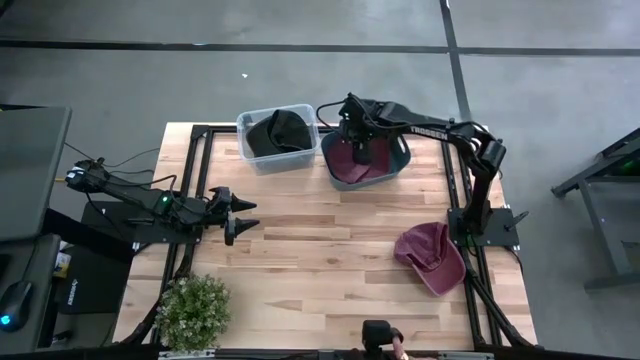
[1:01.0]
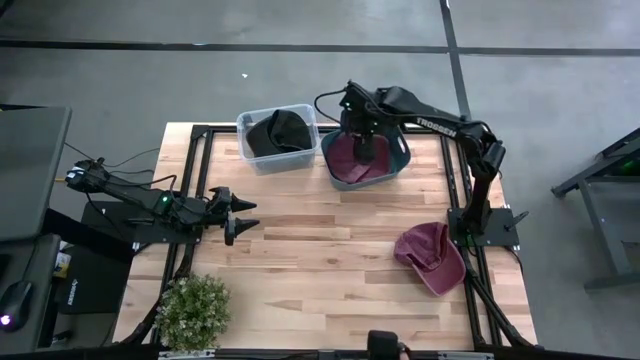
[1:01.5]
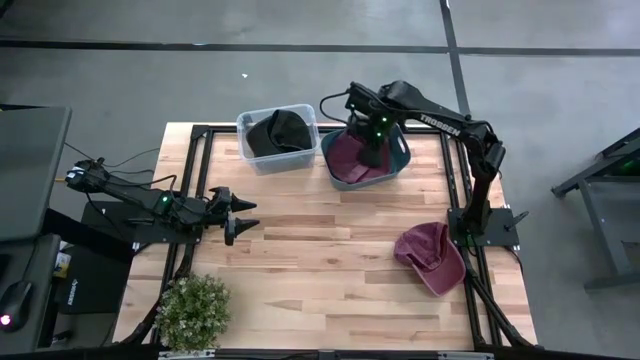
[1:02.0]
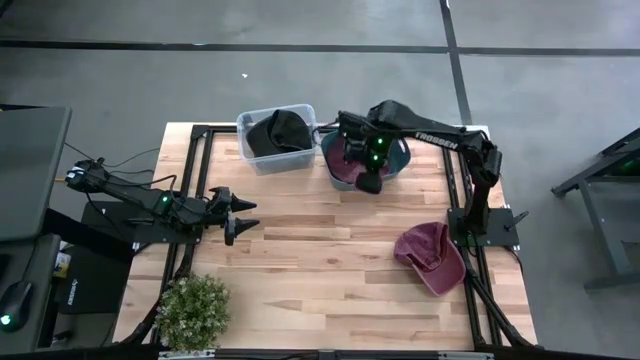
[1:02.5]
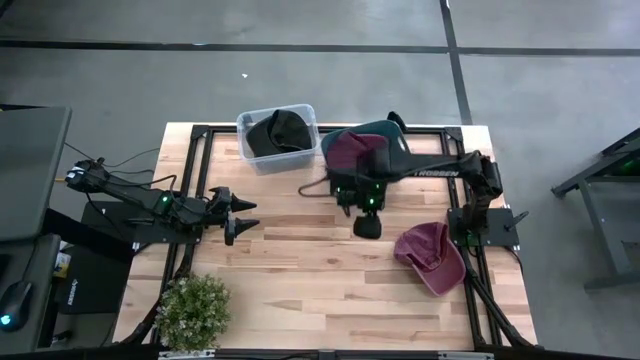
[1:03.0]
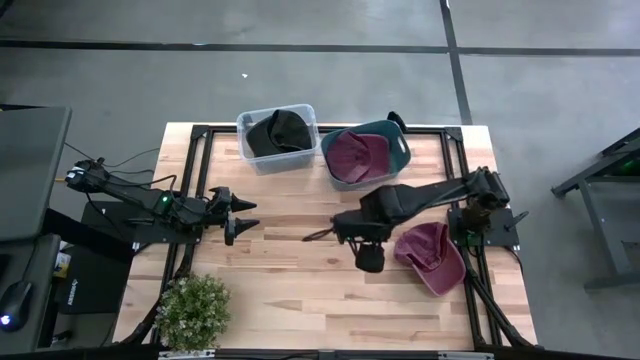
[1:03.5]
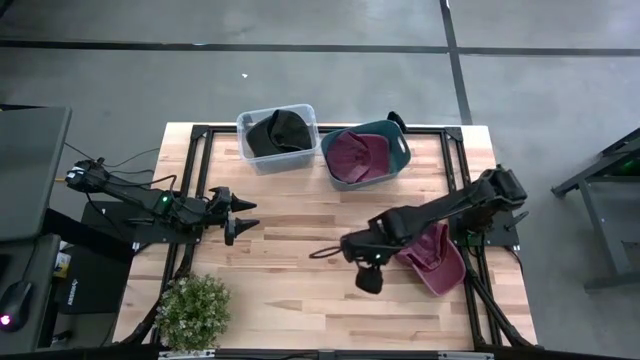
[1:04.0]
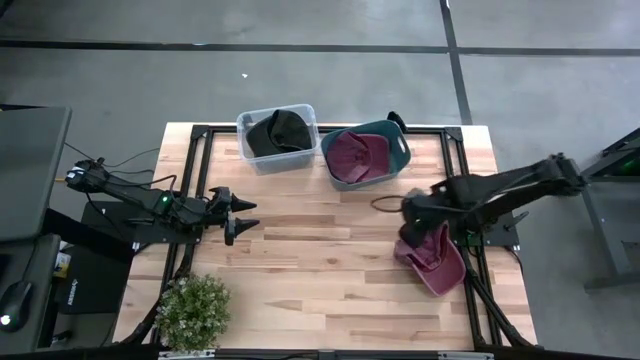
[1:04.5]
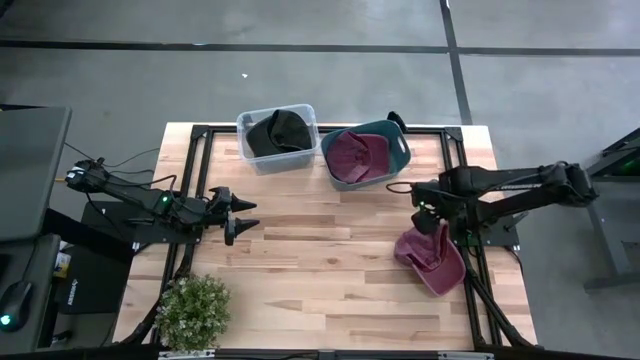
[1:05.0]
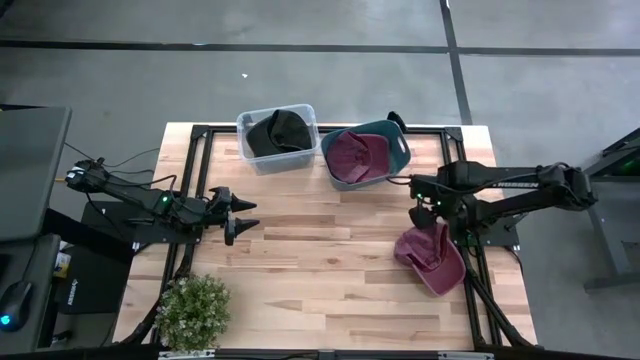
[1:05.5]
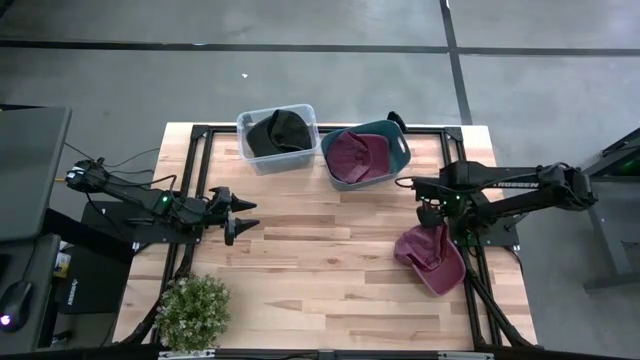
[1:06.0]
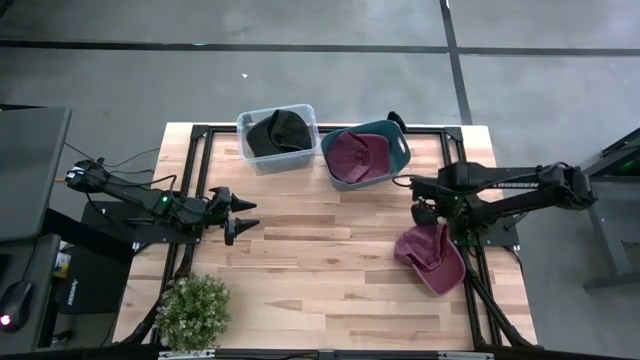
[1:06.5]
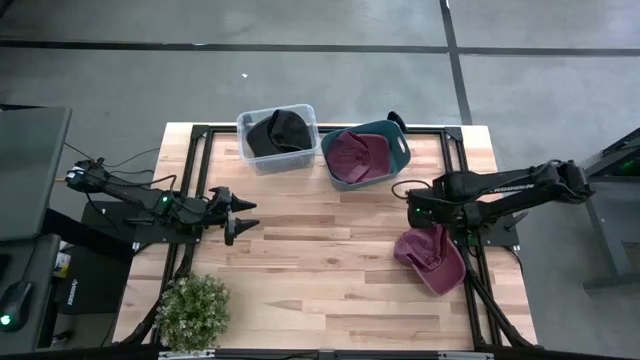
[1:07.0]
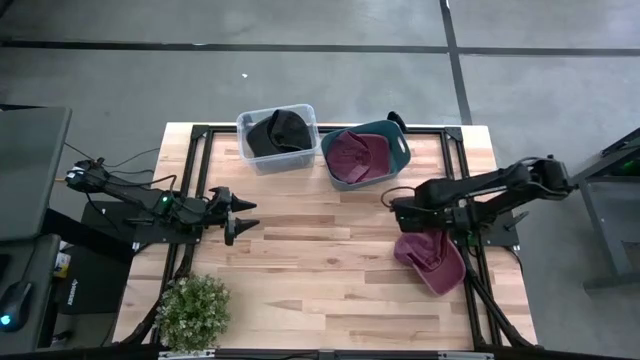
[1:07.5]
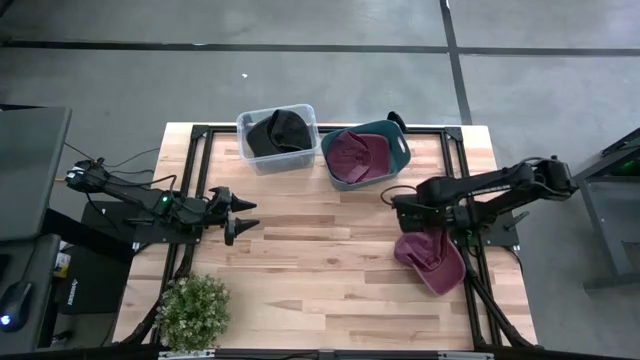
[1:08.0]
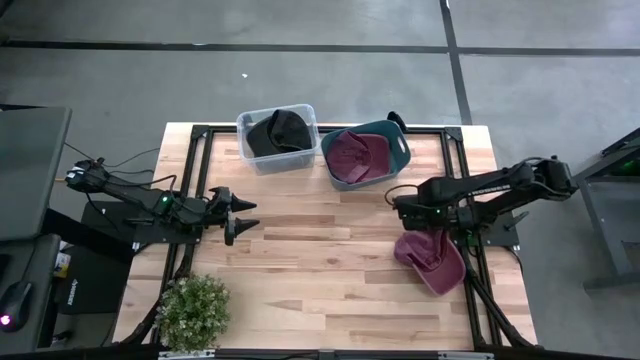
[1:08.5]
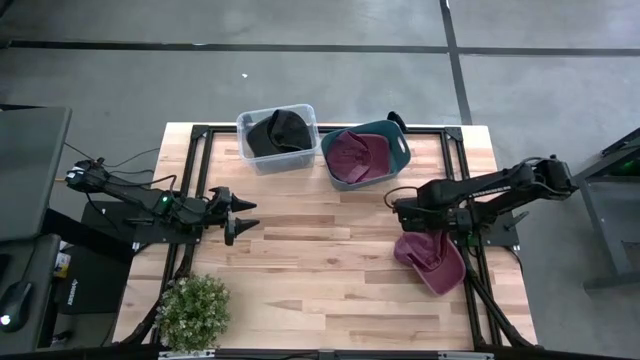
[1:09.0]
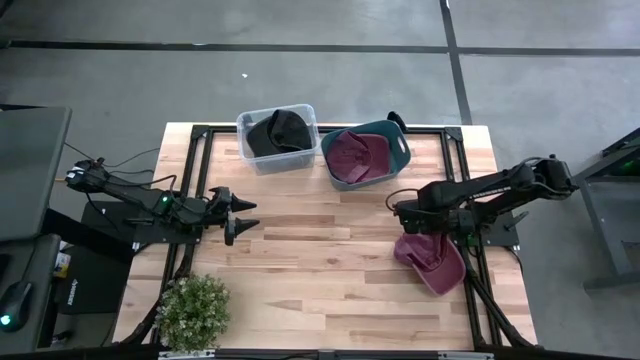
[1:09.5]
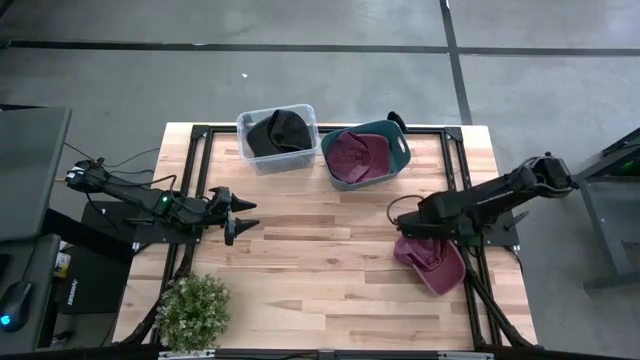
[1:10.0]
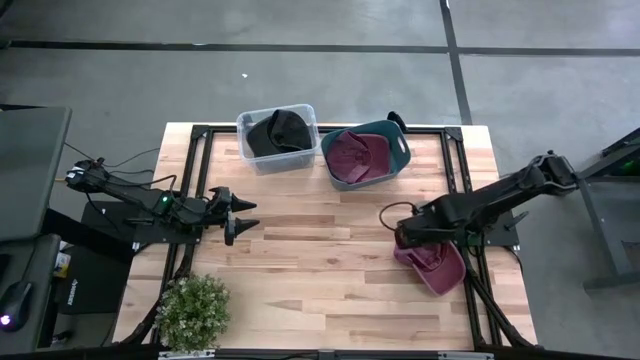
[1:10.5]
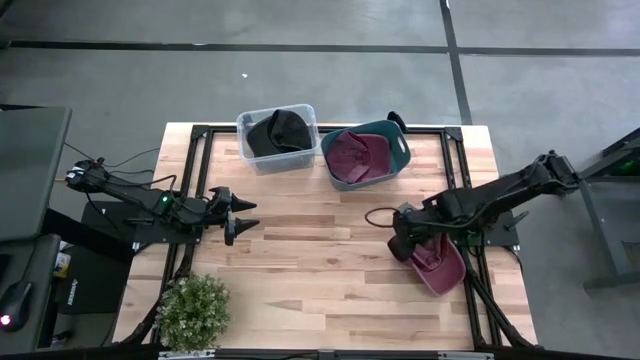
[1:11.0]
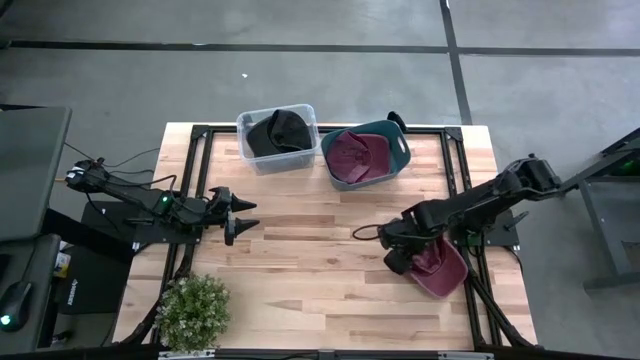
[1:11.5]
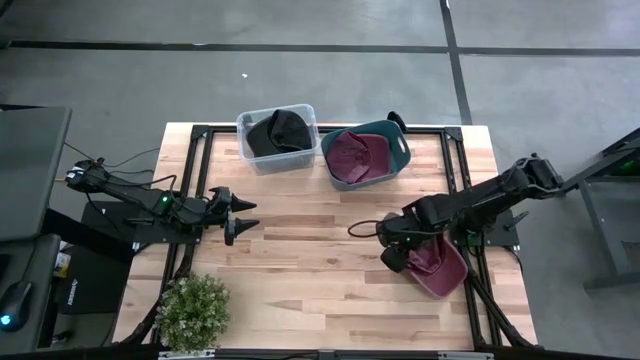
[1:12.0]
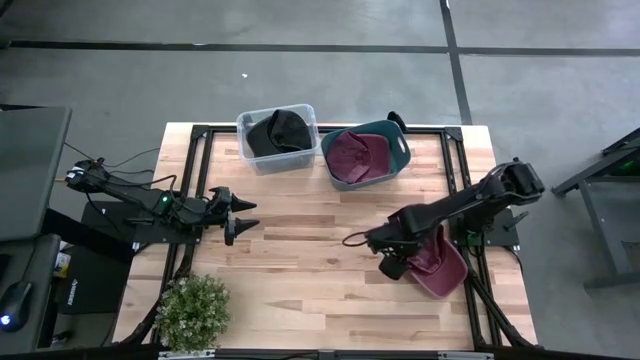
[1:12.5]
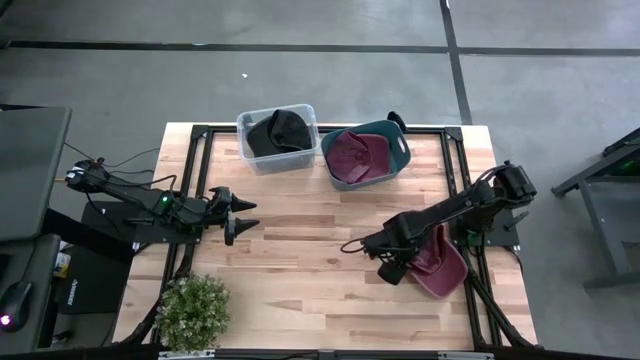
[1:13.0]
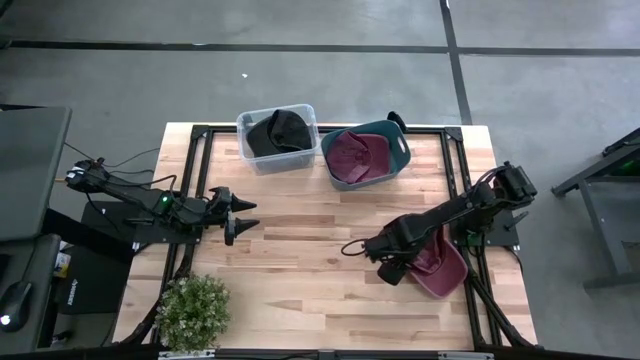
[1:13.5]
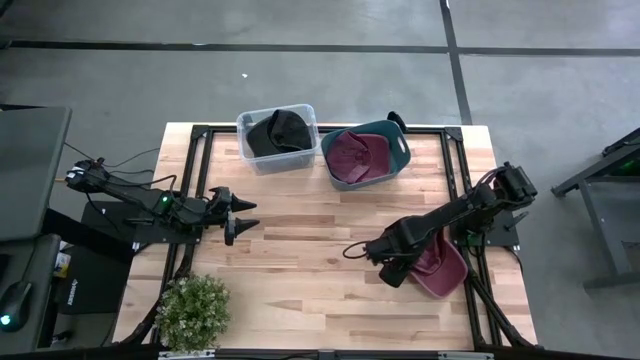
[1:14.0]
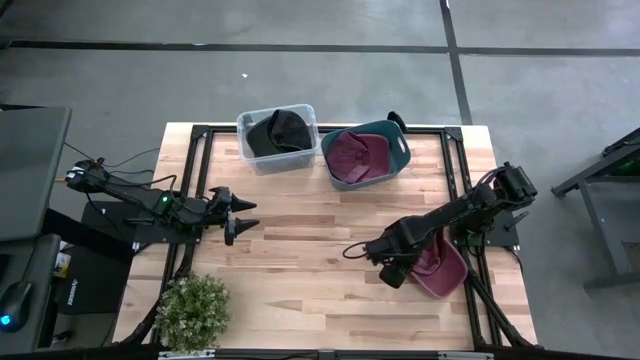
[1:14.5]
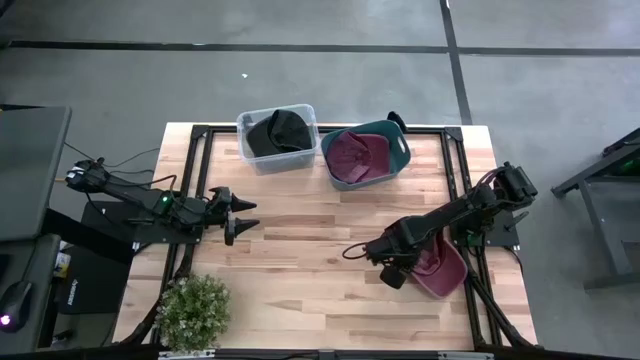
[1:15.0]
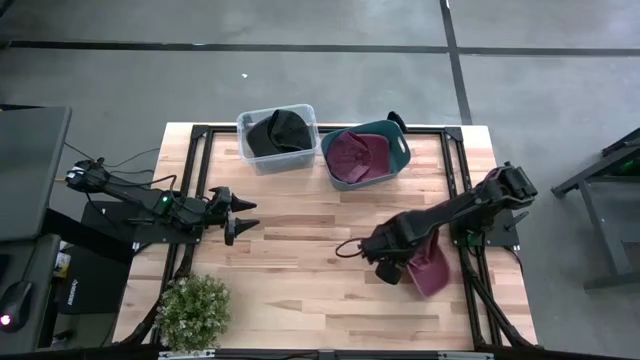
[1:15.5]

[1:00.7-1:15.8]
Task: Pick & Place hat
Put the red cap into the blue bin

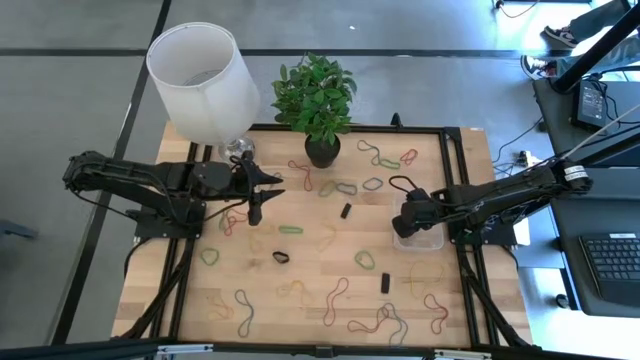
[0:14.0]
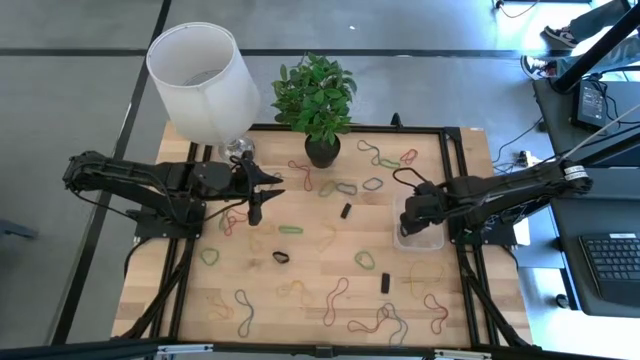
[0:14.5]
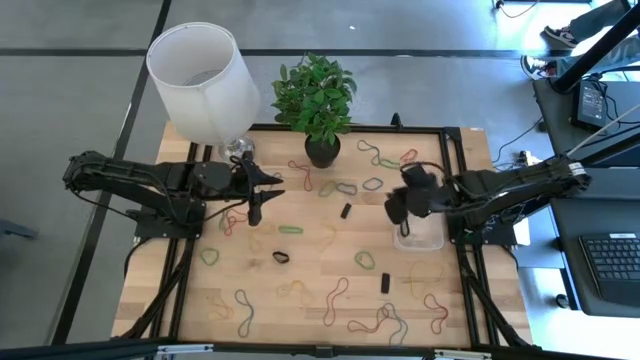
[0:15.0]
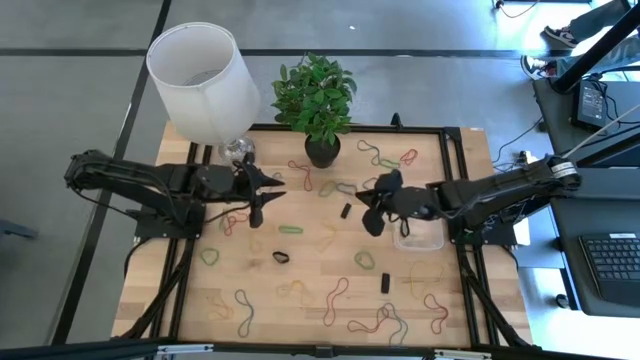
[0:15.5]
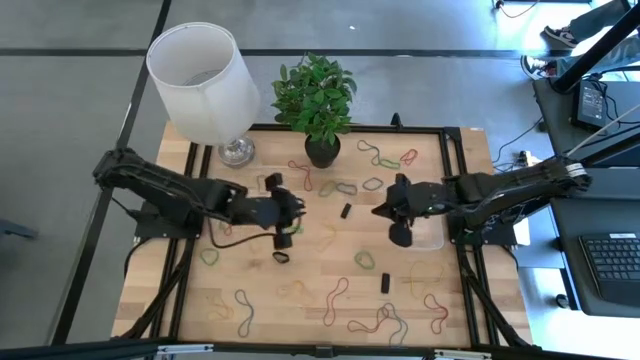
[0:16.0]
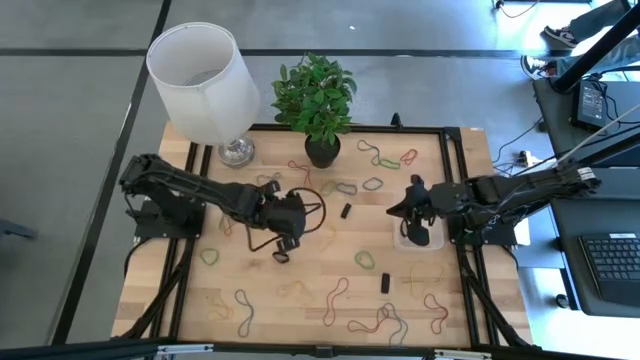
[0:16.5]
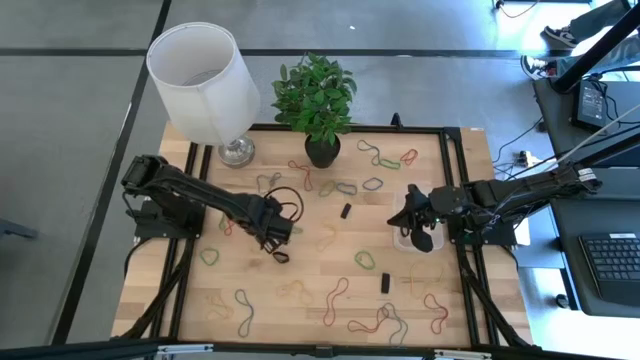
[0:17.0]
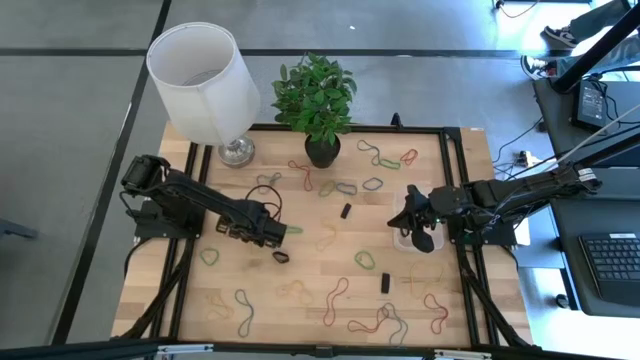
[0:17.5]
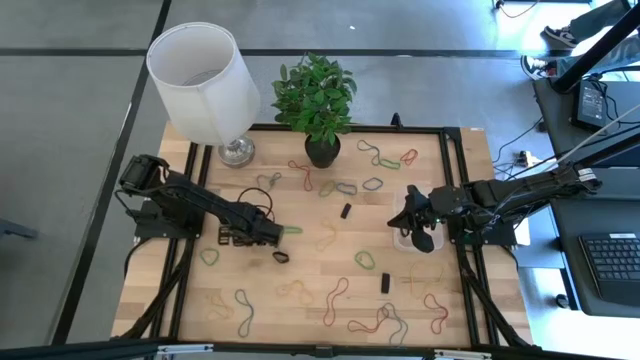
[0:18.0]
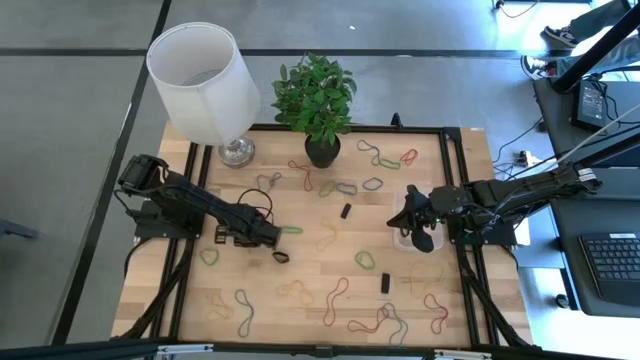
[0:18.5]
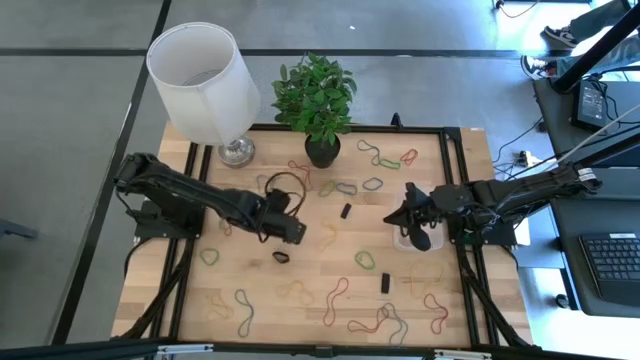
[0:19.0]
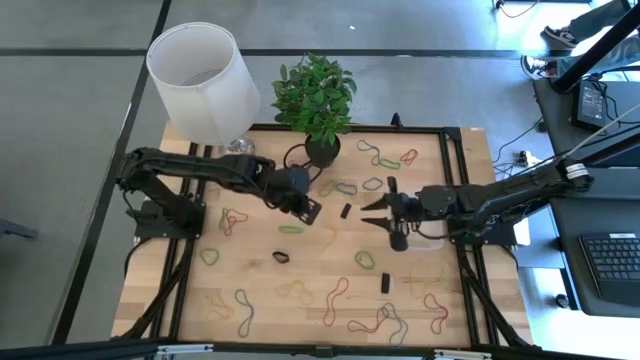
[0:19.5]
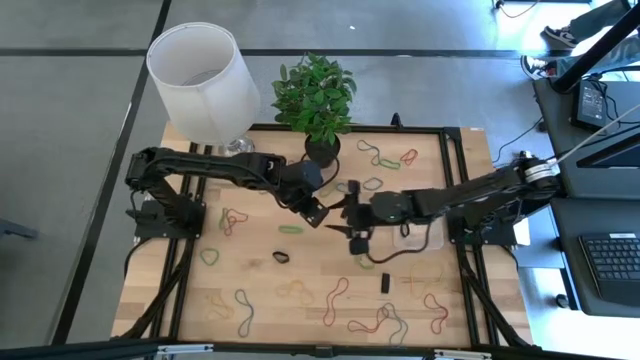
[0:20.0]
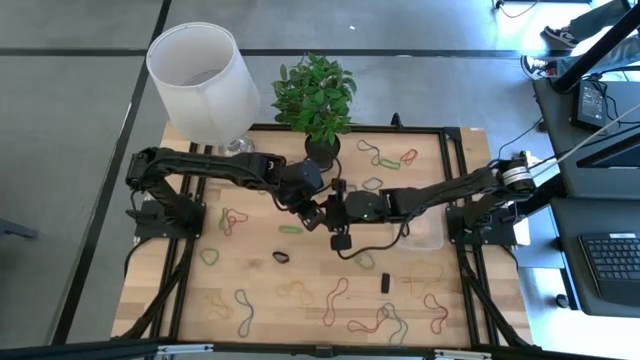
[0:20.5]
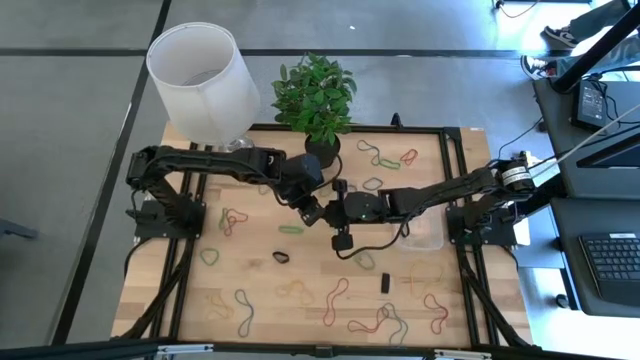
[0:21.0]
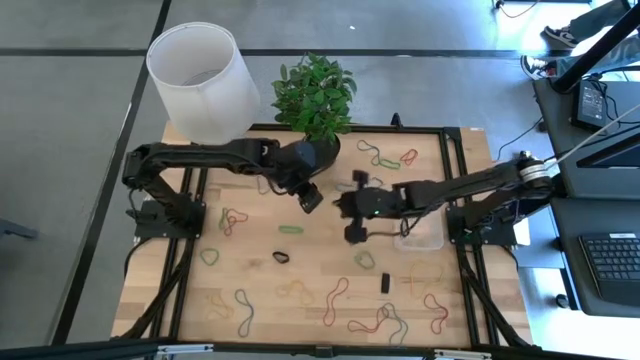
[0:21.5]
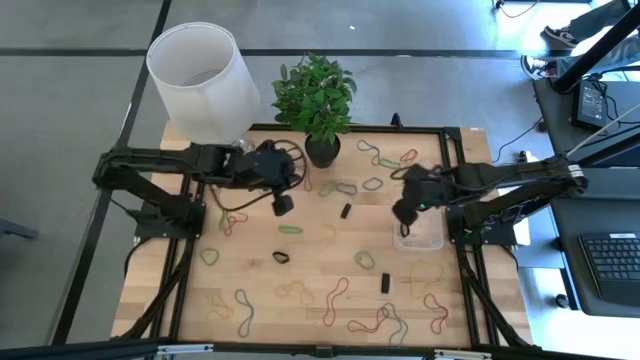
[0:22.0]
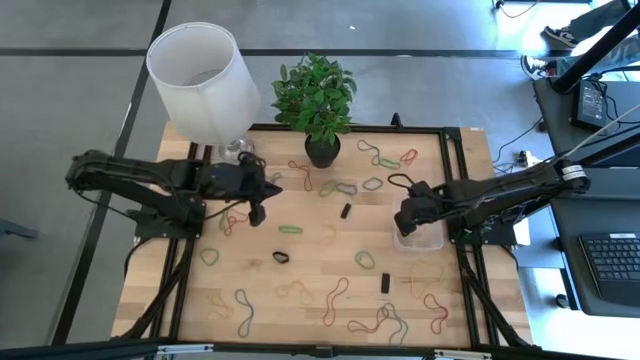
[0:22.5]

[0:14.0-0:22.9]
Task: Pick and place rubber bands into bin
Put the yellow rubber band into the transparent bin
